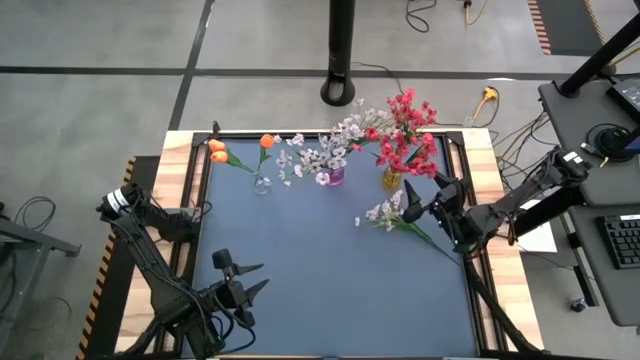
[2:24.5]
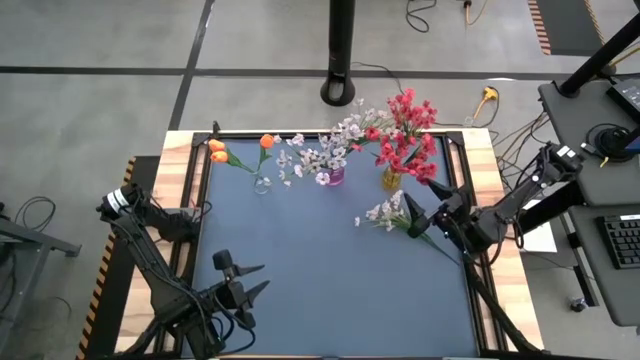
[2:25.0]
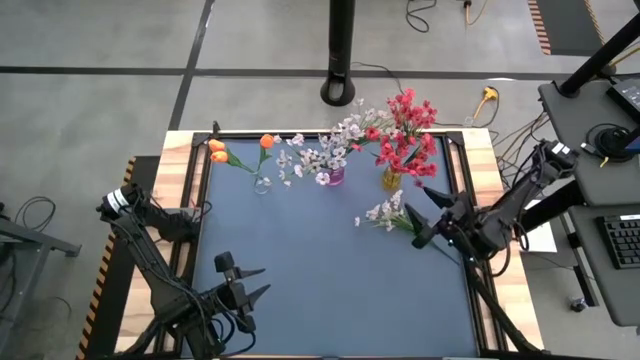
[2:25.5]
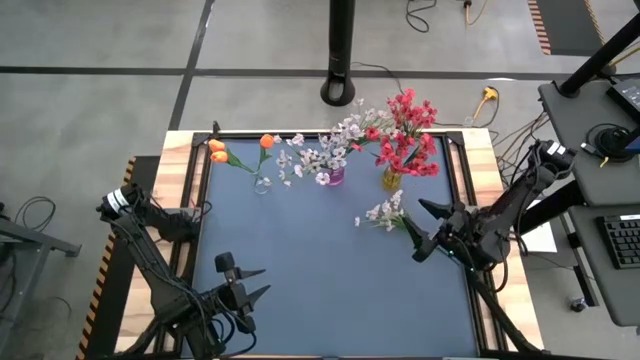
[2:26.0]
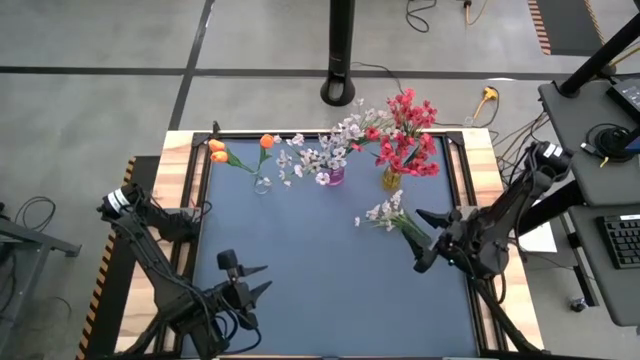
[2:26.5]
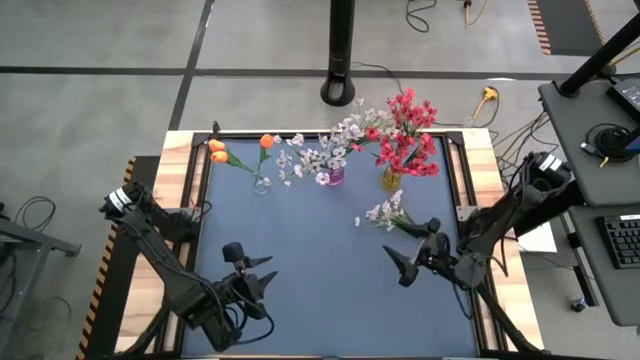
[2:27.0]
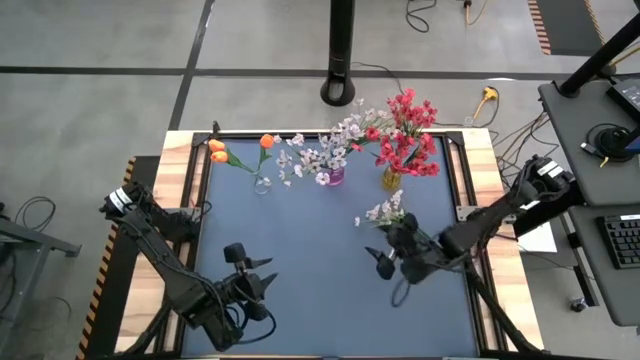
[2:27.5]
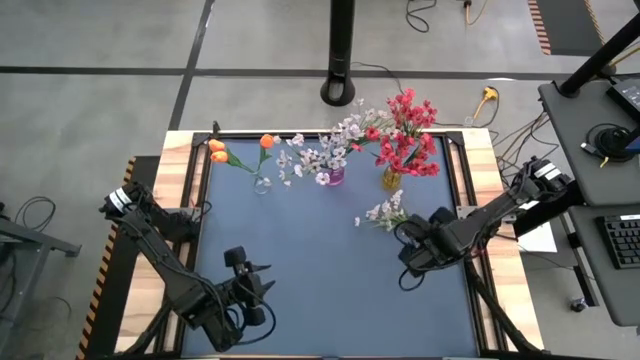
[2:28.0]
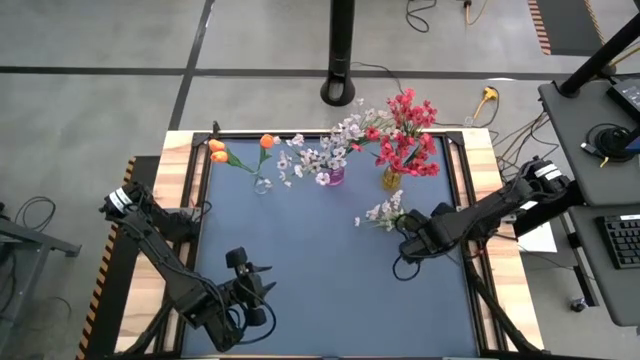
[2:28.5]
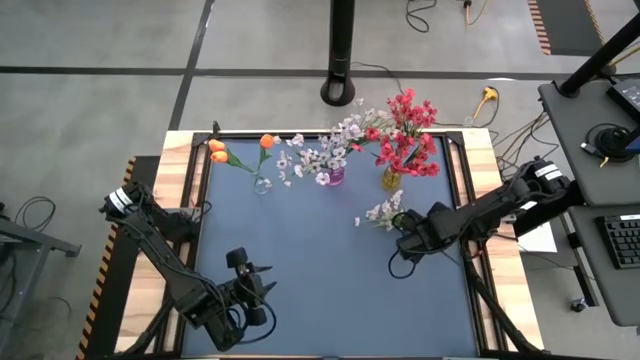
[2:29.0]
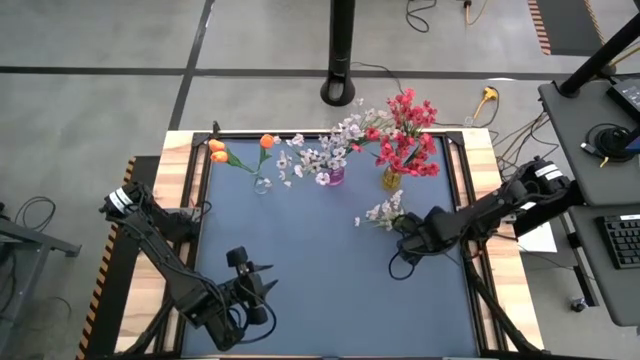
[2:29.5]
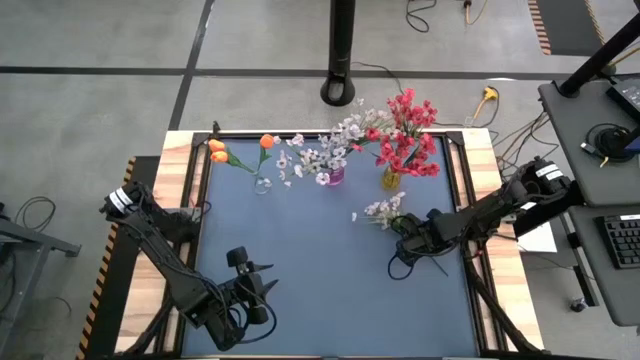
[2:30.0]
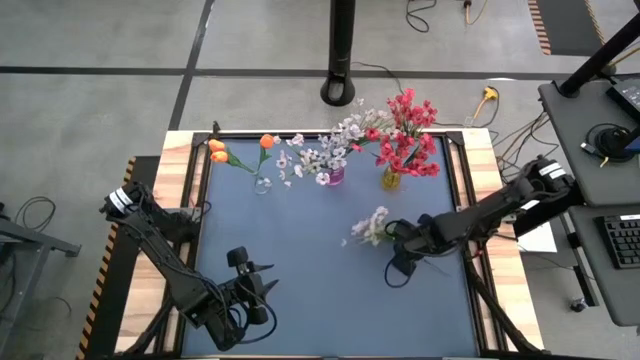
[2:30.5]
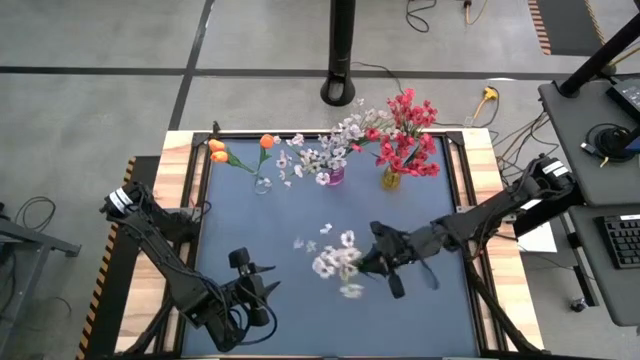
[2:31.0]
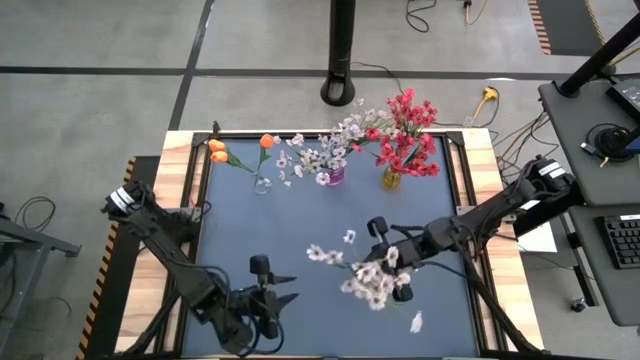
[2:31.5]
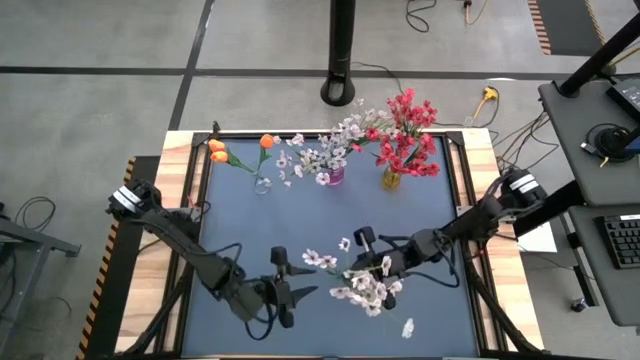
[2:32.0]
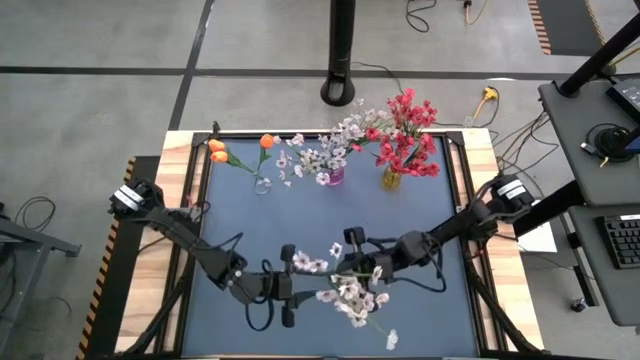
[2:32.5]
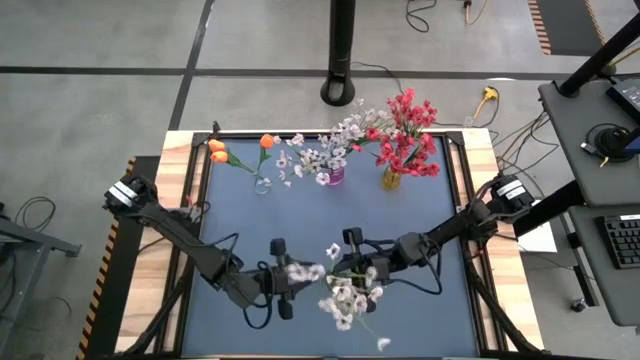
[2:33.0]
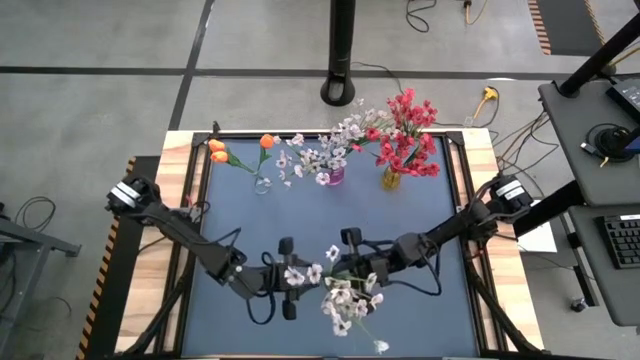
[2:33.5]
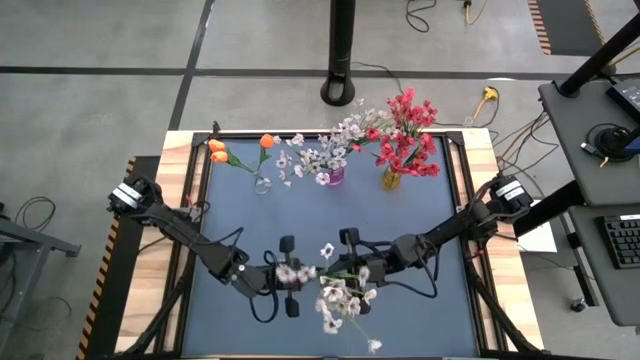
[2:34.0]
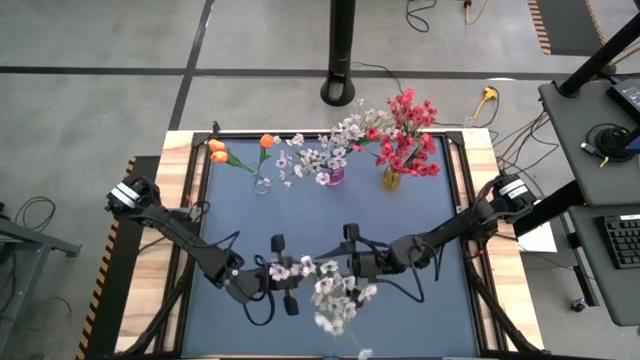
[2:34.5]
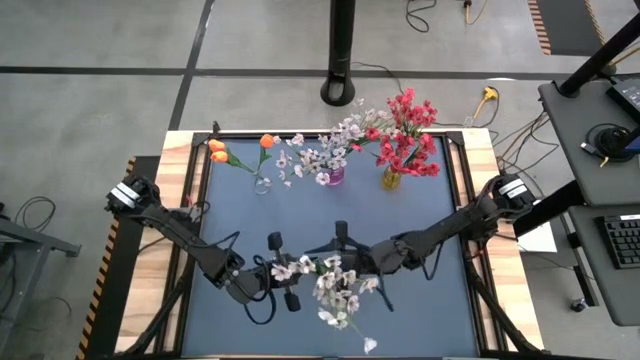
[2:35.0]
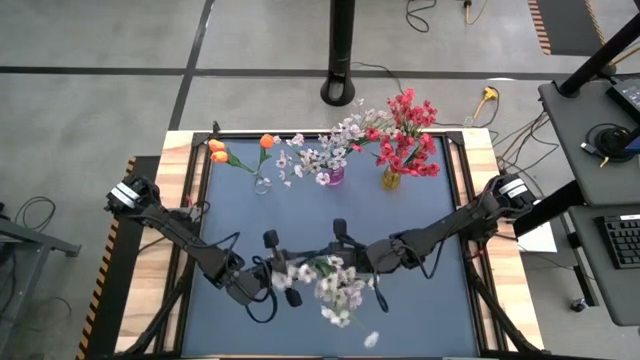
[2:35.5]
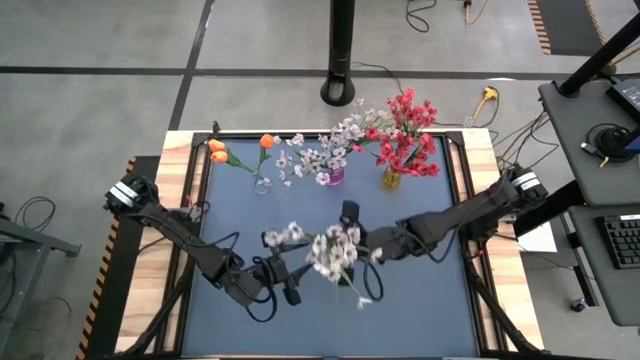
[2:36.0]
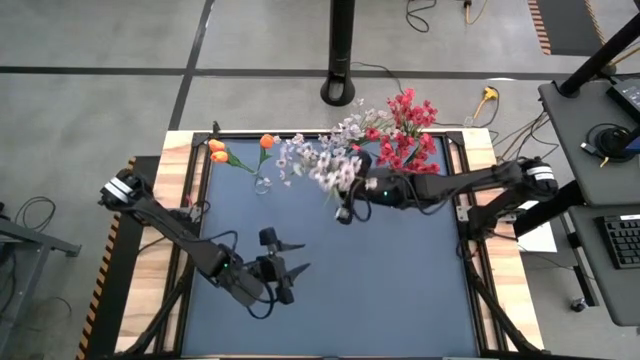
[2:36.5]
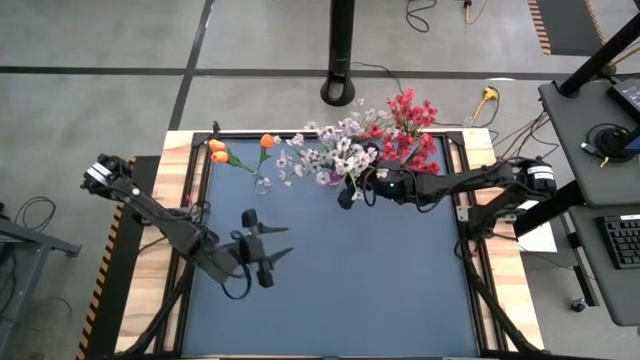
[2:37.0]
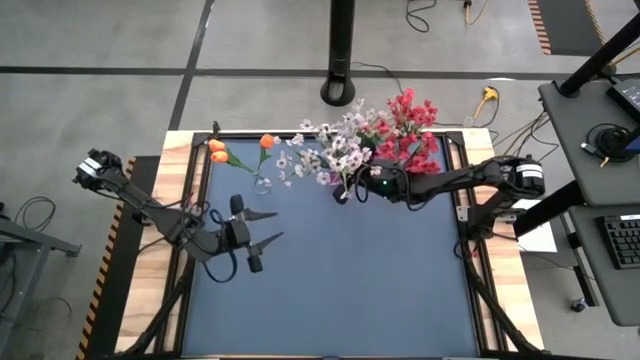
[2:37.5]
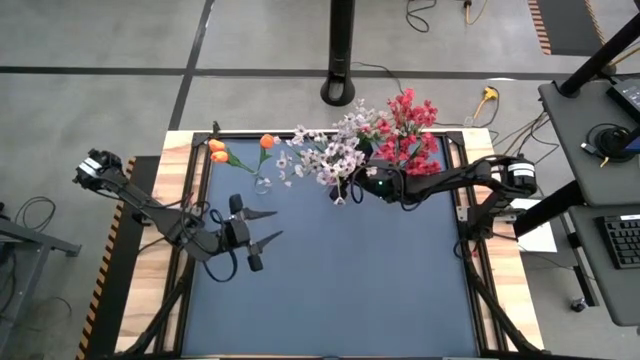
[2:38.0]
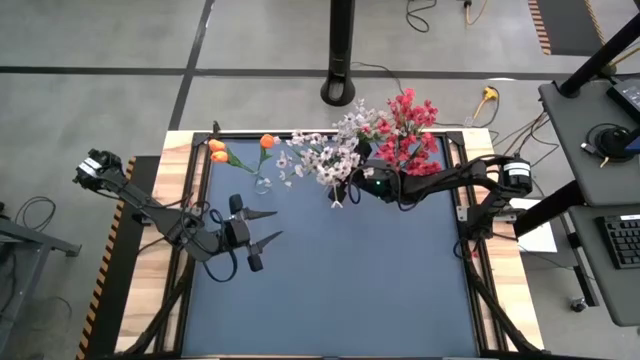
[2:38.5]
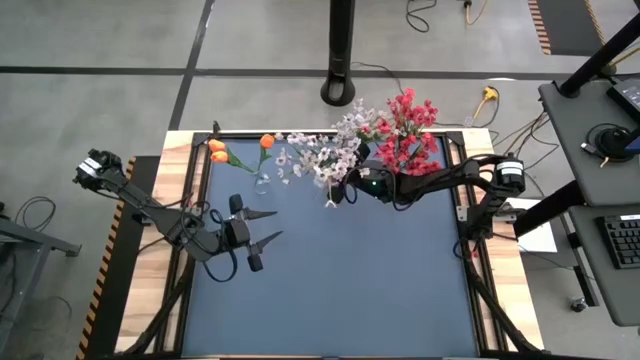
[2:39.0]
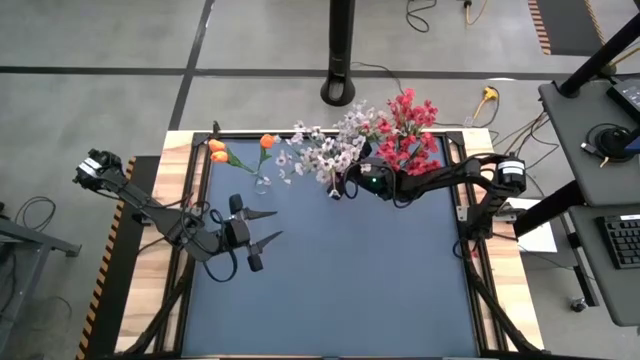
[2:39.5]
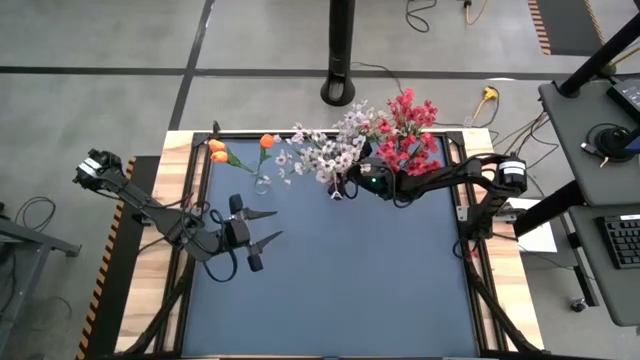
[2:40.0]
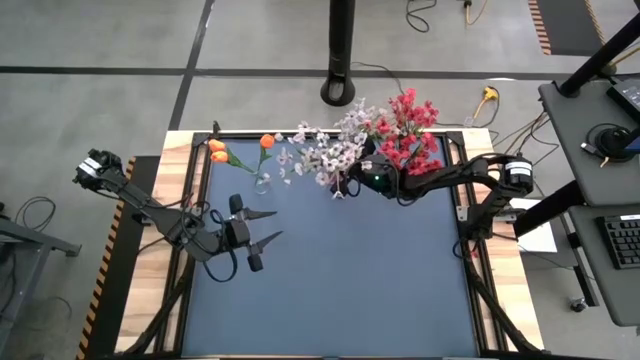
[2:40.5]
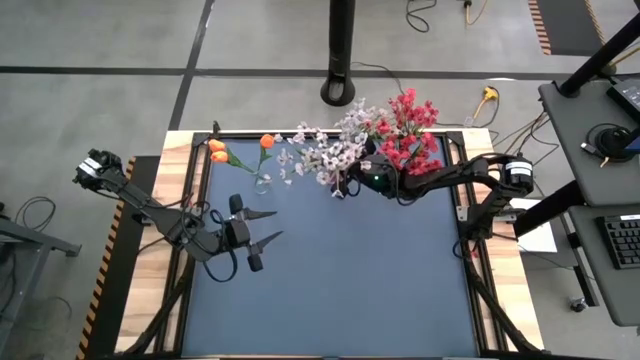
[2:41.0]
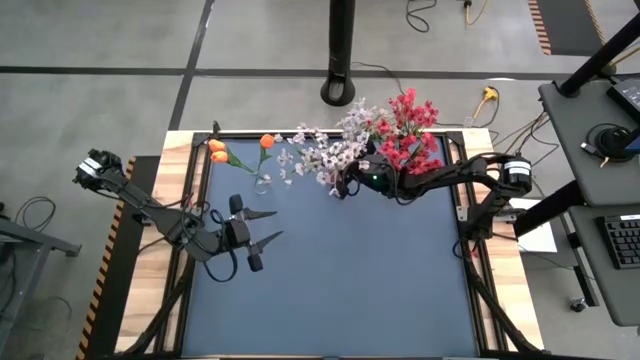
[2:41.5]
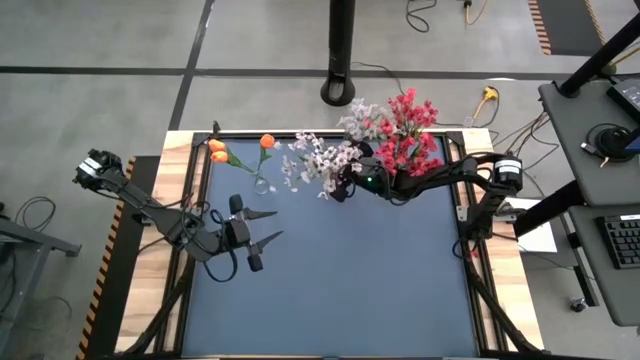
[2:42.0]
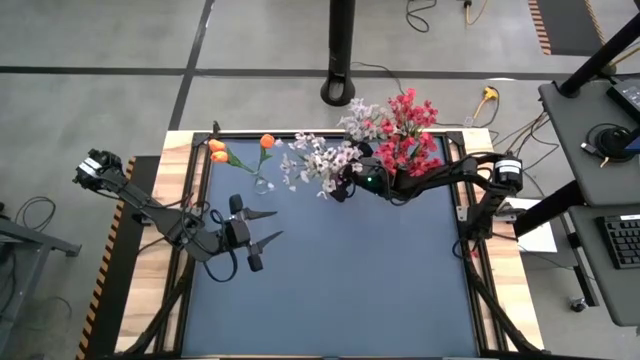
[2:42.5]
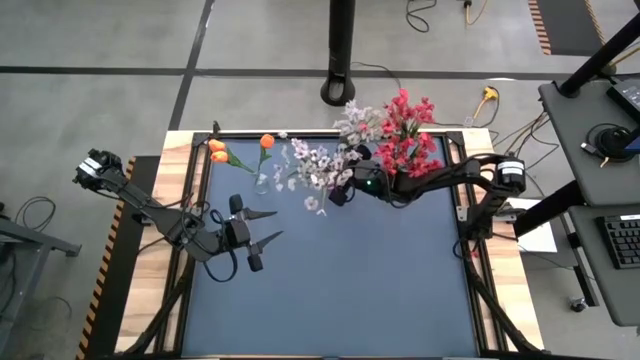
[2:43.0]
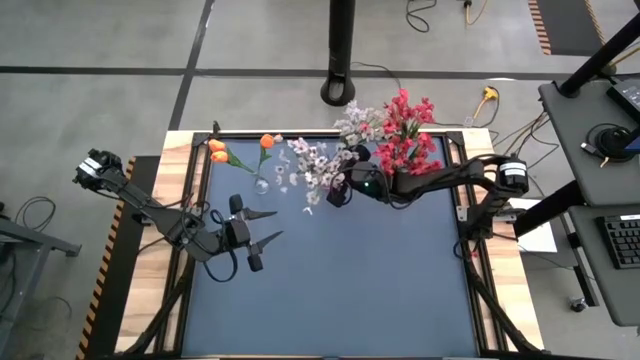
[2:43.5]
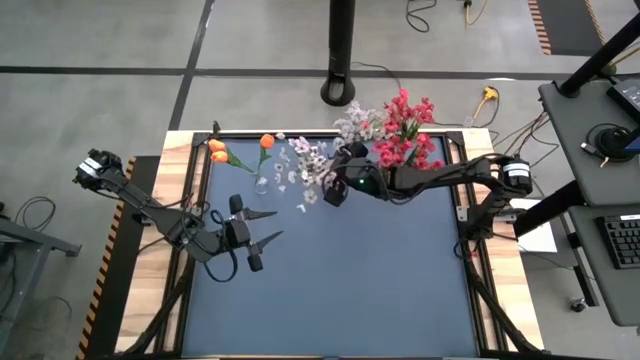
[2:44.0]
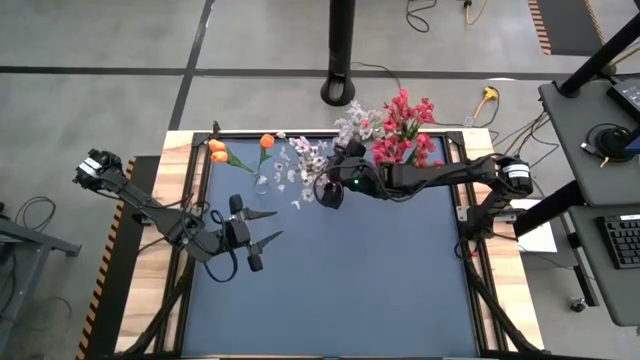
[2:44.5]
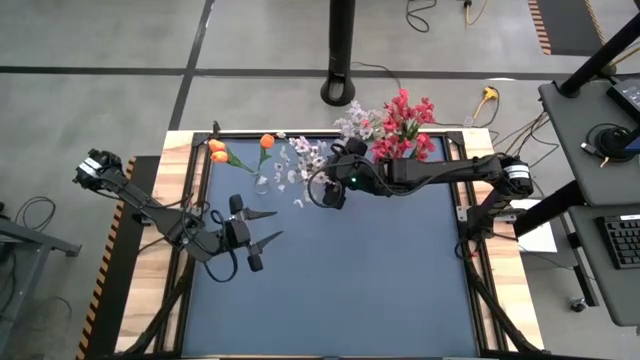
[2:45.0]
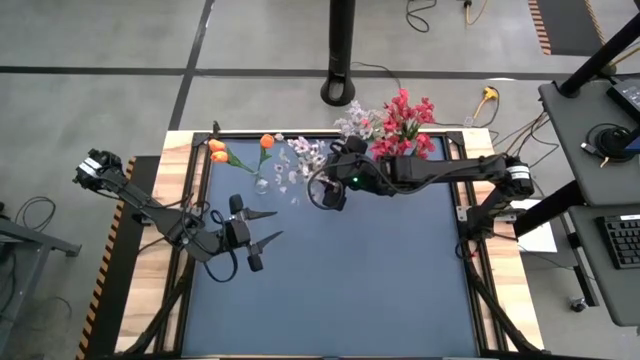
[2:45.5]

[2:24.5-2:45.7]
Task: Sort flowers into vase by color
Put the white flowers into the pink vase
